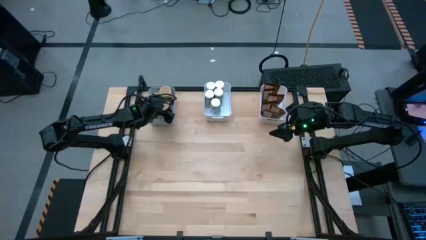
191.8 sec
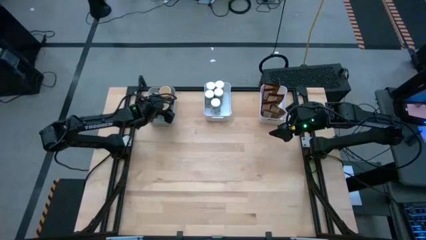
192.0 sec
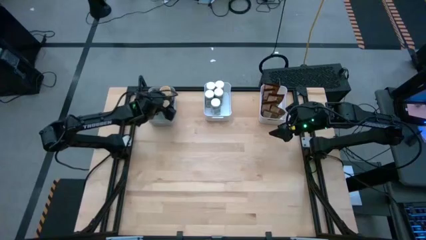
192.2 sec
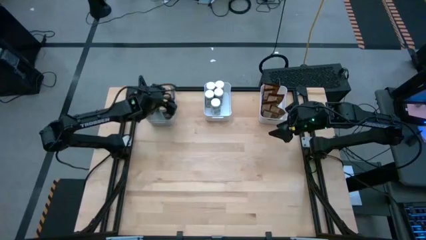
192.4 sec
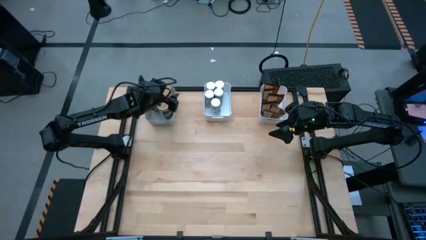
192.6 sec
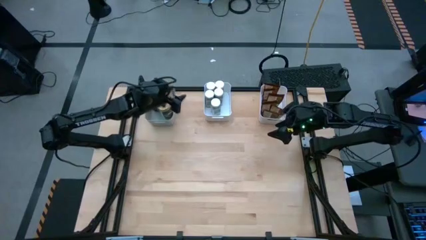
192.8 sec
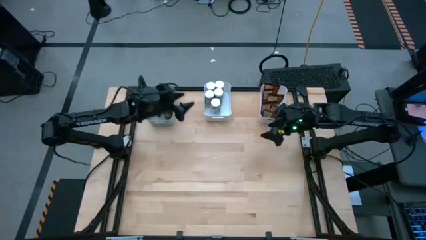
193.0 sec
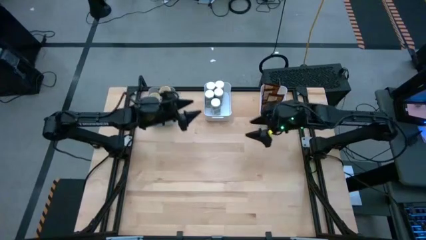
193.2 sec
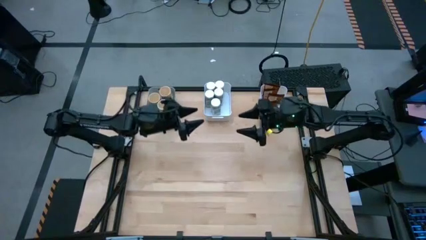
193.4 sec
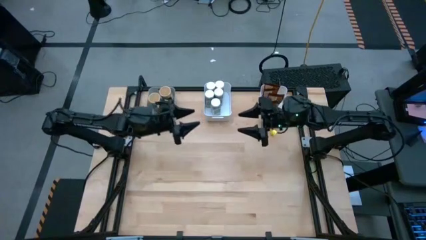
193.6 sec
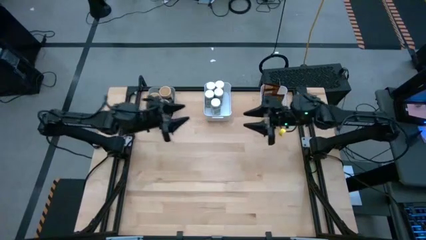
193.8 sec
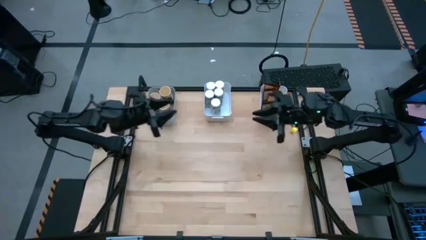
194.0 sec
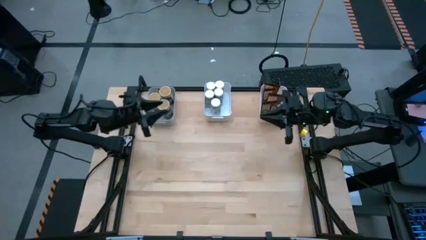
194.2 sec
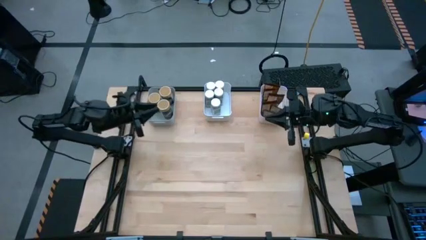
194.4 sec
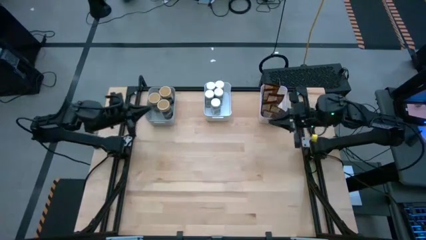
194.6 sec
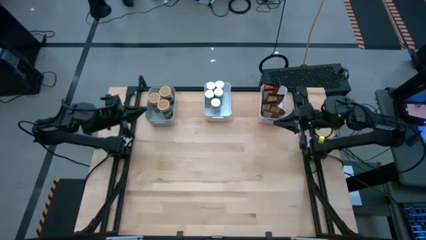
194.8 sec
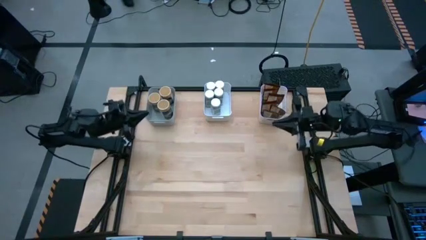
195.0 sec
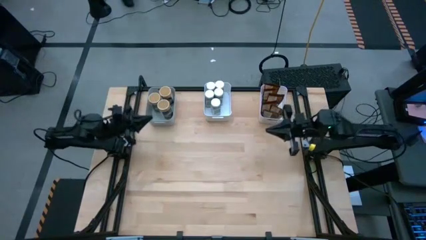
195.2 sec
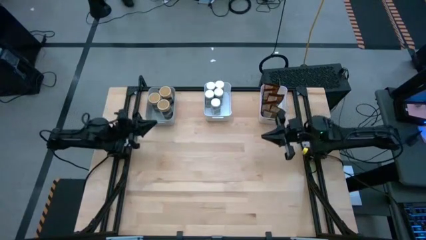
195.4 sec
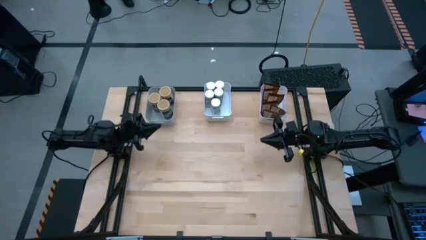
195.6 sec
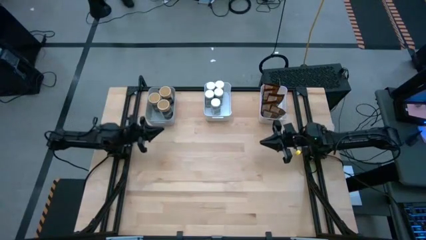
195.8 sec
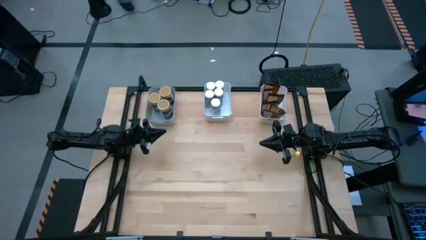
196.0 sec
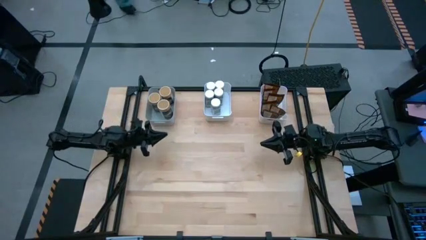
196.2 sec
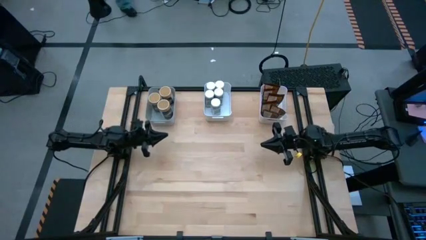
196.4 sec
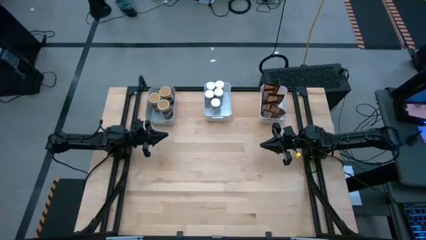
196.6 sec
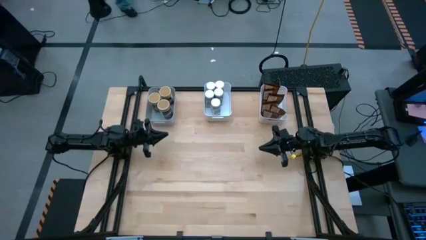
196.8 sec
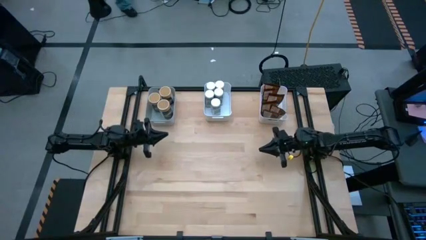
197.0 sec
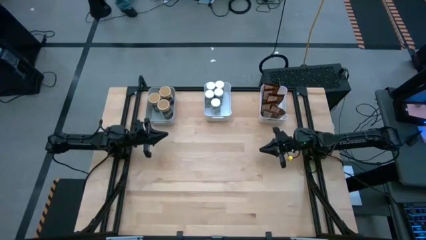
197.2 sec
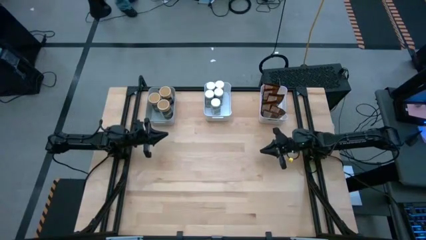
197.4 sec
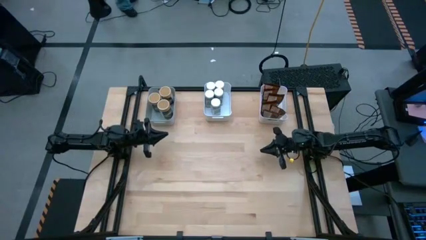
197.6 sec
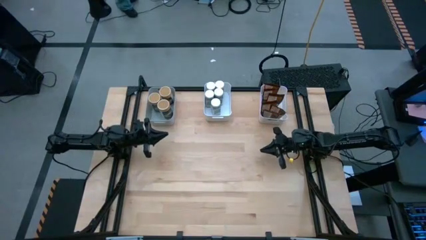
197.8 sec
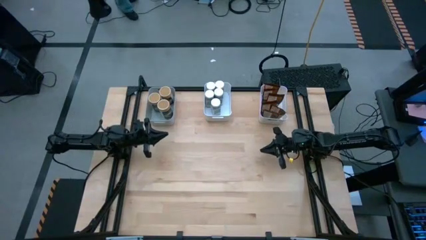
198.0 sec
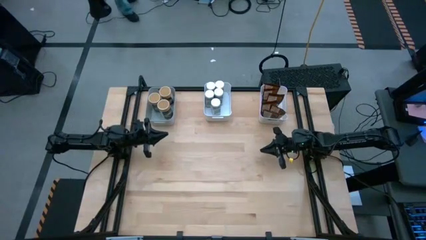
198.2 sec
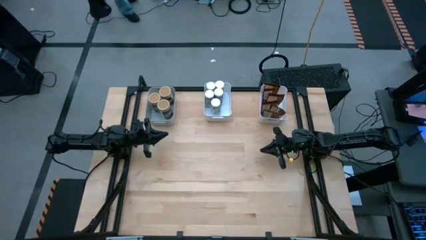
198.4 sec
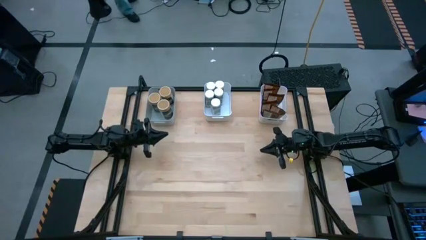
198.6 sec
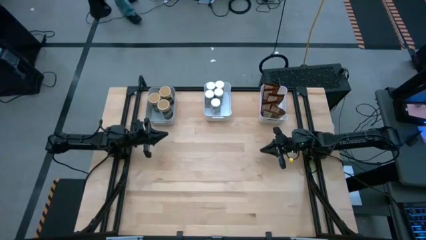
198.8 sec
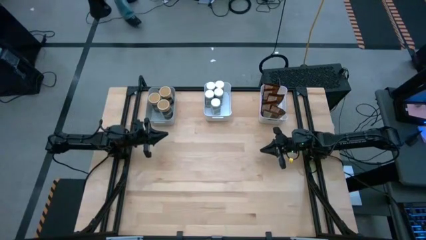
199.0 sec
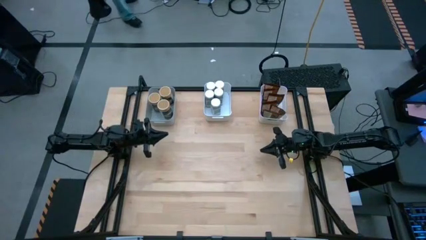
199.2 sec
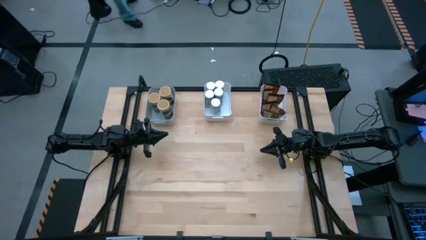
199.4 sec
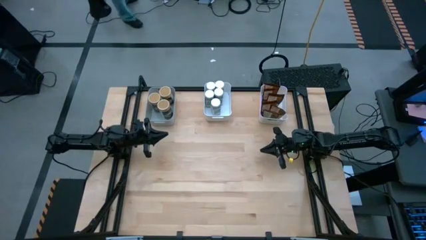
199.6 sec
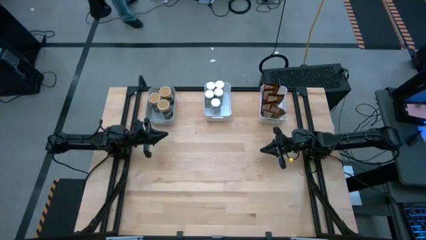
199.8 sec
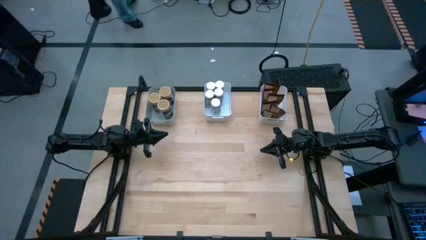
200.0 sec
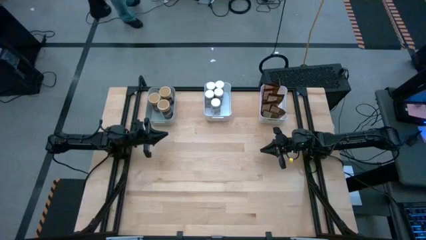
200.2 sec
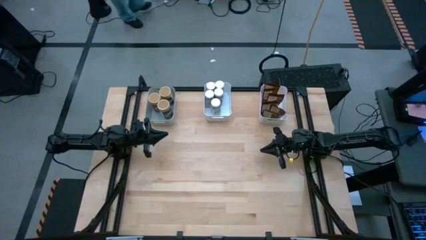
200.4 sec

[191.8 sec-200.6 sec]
Task: Sort spices by type
Return to Home Position

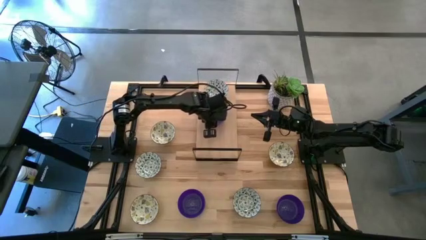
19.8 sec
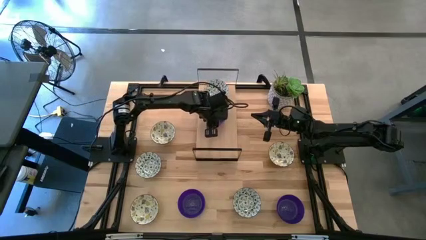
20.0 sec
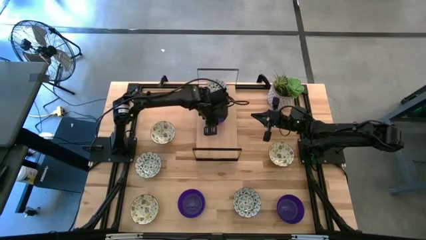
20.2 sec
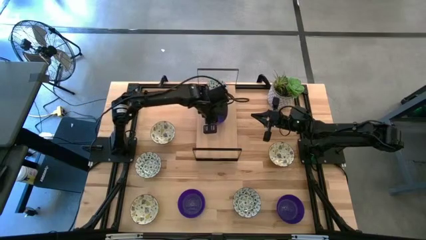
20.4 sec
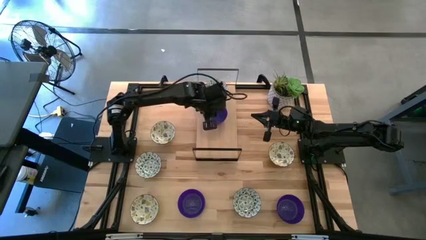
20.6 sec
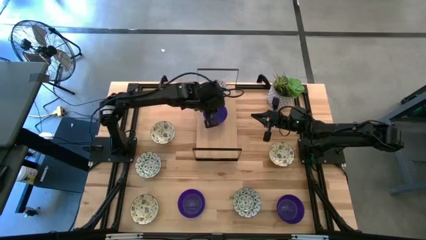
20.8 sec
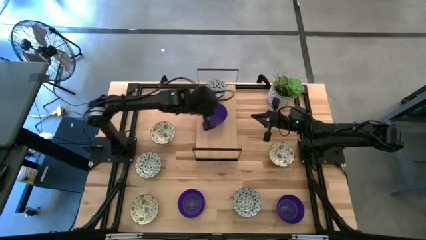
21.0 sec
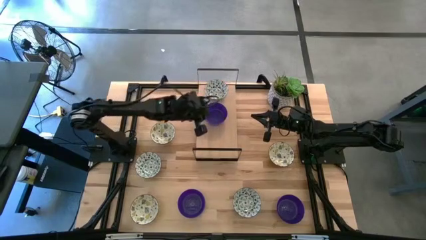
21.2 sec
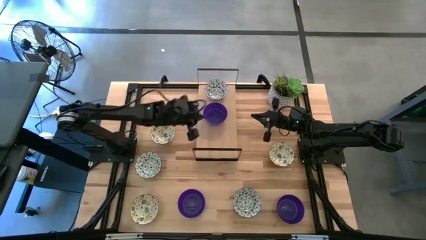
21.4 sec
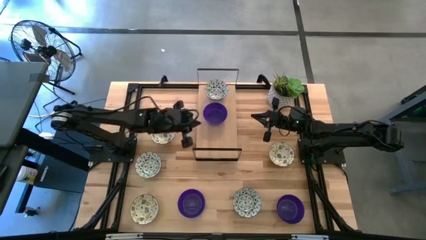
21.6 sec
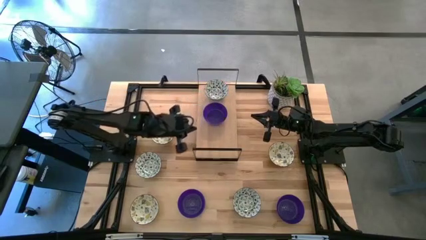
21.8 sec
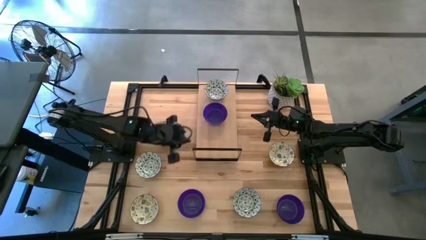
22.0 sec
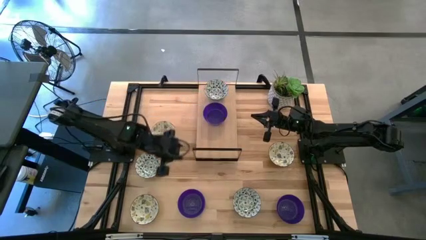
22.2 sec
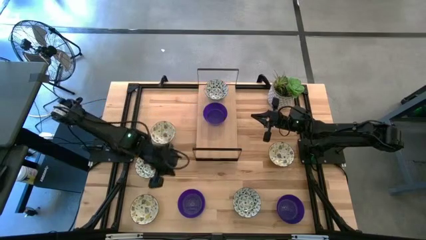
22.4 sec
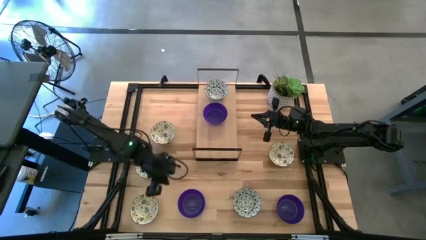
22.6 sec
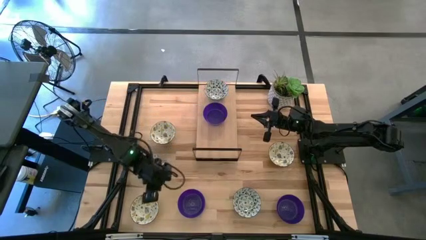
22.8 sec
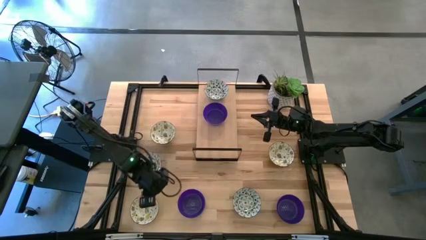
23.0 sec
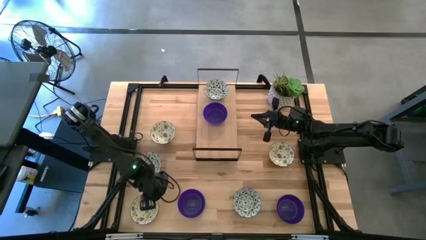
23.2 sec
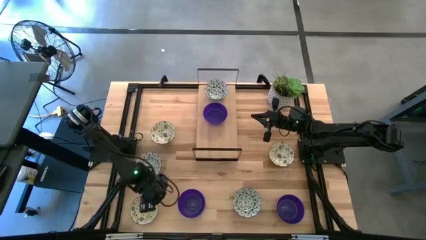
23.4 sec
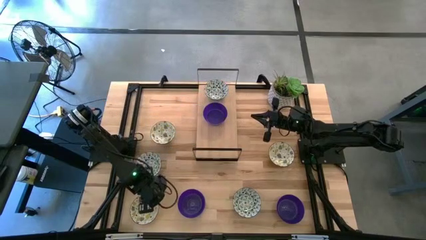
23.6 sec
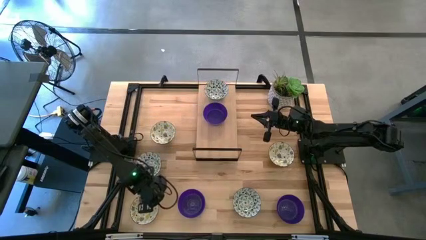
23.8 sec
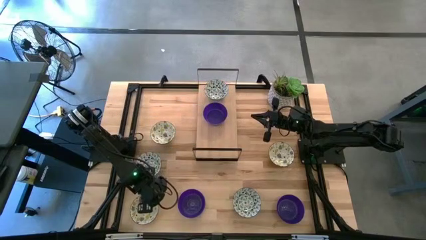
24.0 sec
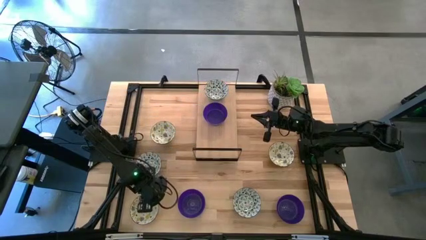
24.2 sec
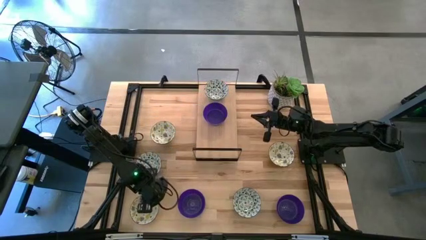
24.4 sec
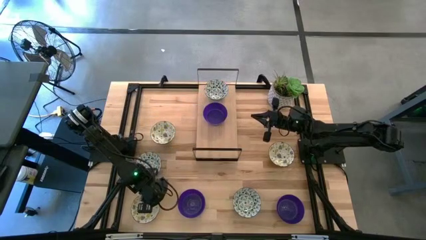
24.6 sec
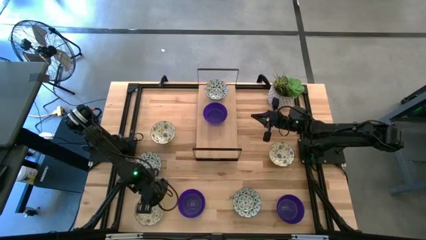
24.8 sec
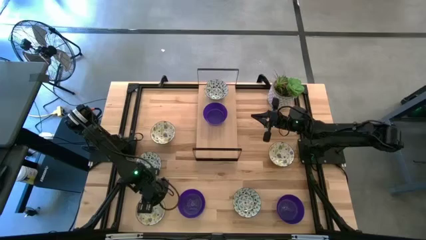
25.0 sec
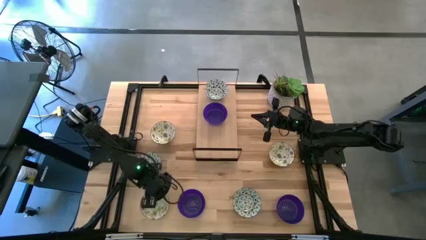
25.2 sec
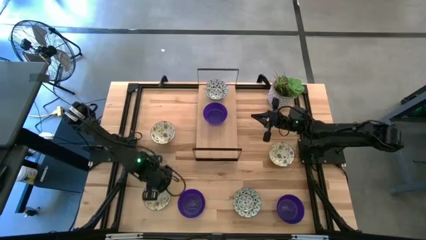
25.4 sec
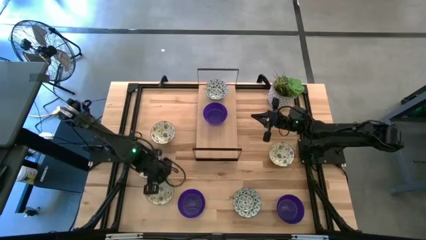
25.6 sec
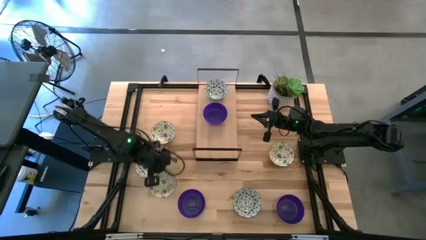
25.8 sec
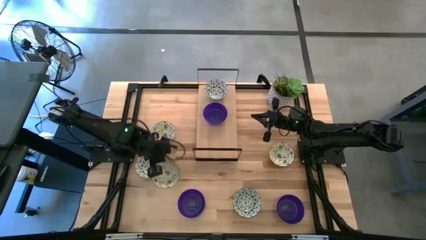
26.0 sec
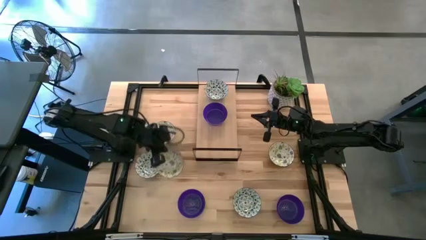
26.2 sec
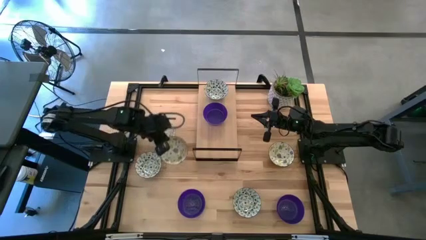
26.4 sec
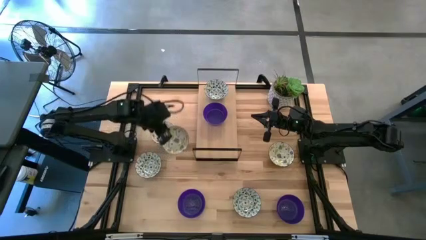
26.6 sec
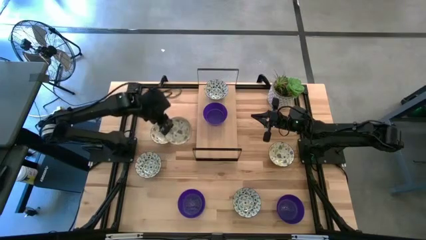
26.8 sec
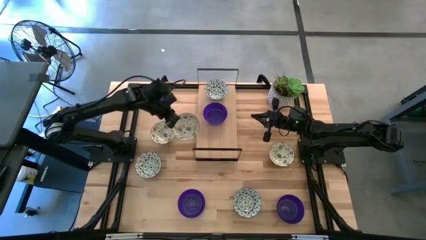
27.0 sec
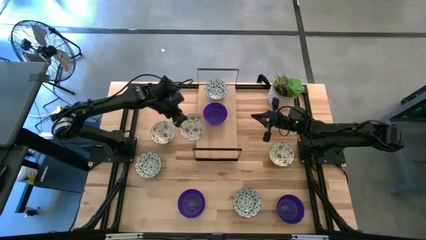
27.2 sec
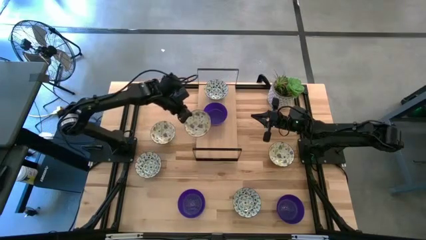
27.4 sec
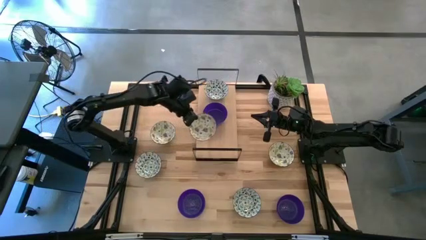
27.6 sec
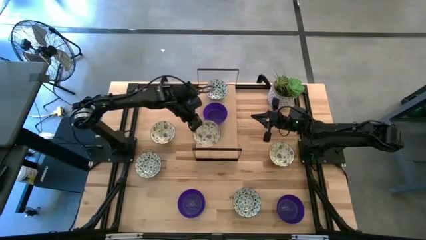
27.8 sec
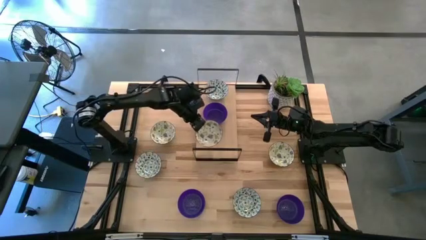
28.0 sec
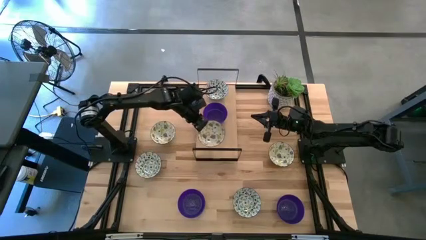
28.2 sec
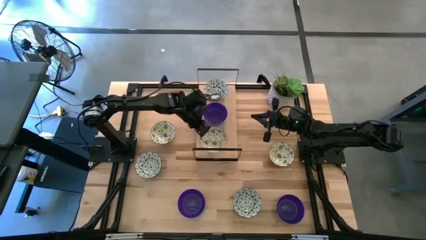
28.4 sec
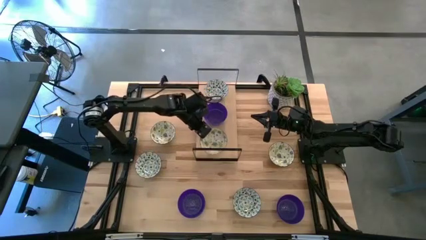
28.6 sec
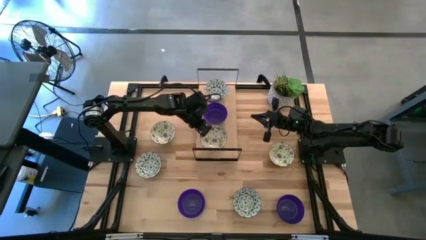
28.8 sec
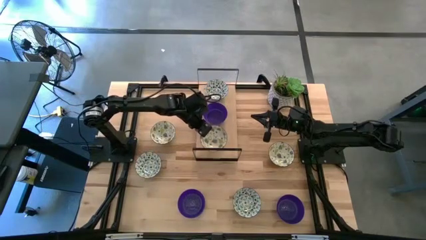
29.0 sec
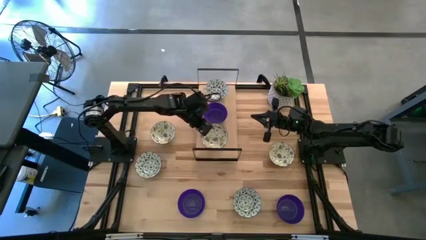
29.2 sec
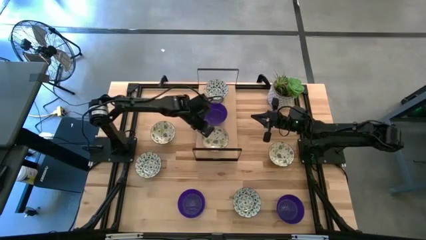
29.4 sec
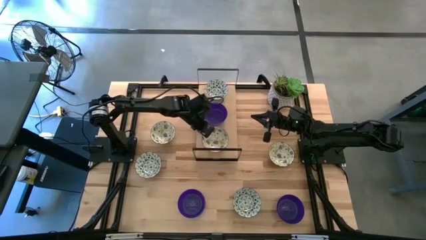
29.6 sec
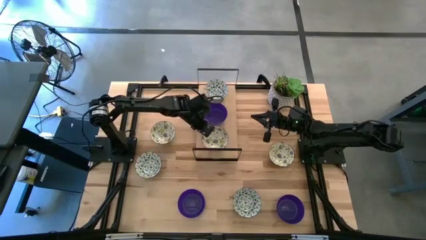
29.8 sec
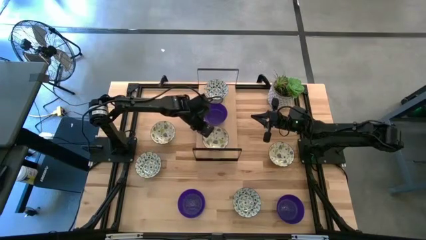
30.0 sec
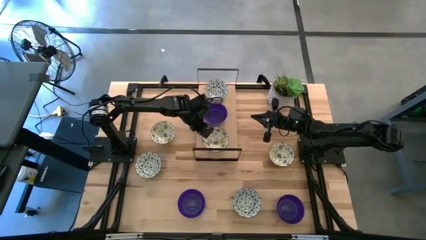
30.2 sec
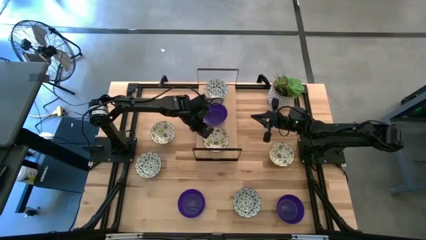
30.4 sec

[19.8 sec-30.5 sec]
Task: Pick & Place Mini bowls
Put the bottom yellow patterned bowl on the shelf
